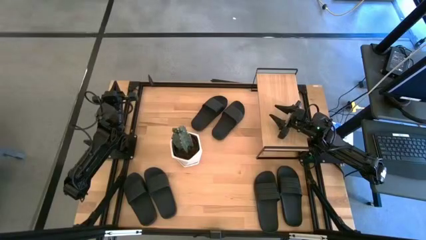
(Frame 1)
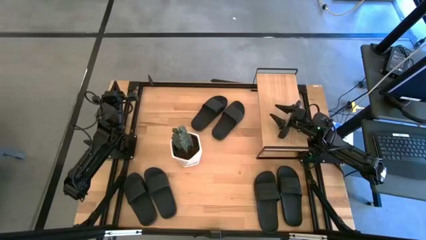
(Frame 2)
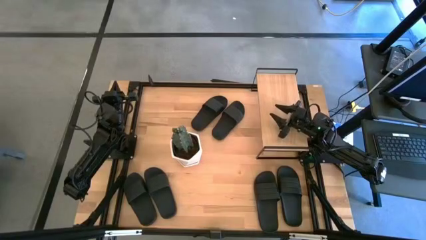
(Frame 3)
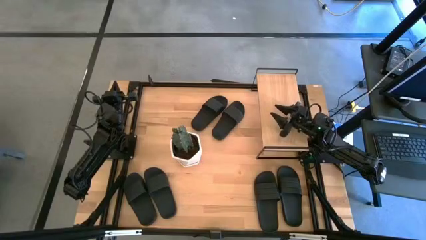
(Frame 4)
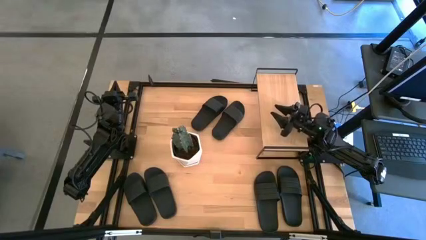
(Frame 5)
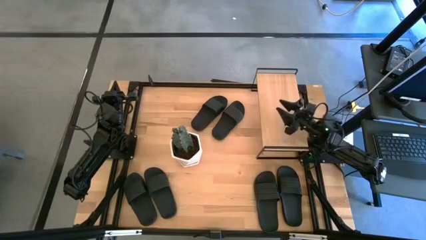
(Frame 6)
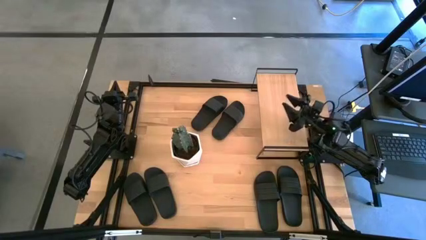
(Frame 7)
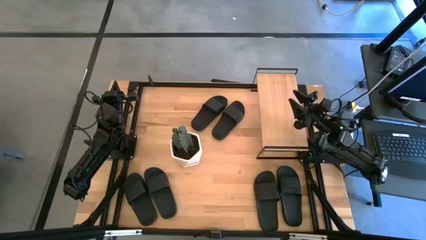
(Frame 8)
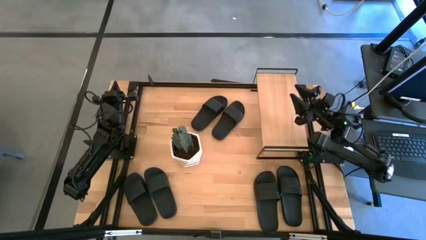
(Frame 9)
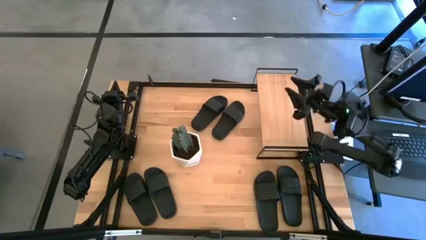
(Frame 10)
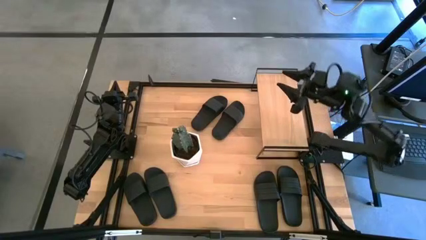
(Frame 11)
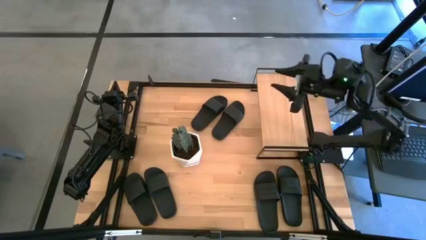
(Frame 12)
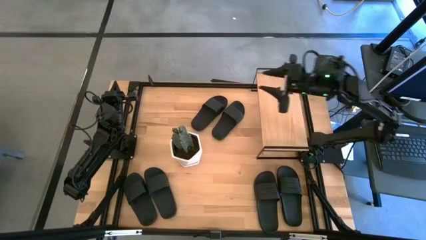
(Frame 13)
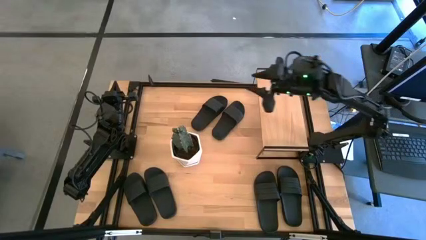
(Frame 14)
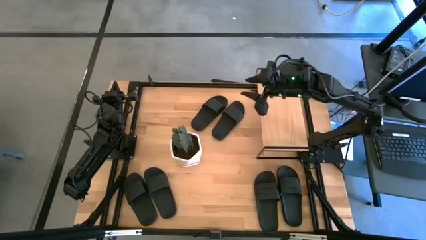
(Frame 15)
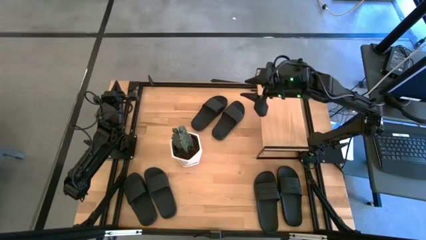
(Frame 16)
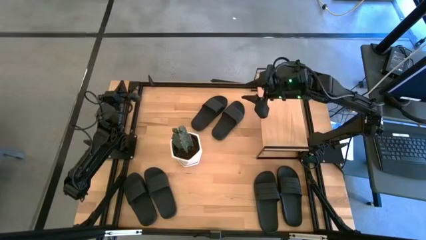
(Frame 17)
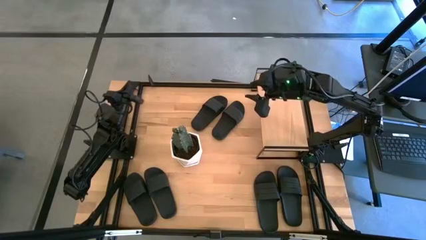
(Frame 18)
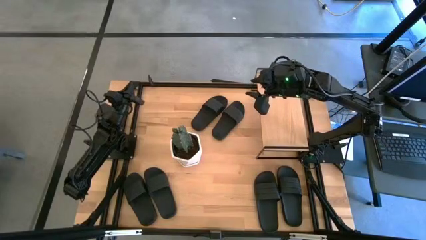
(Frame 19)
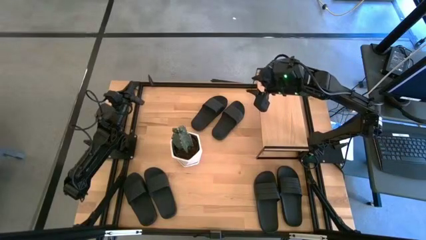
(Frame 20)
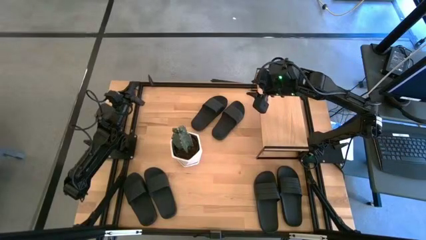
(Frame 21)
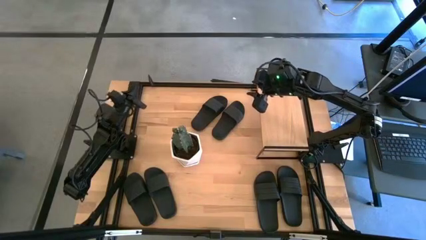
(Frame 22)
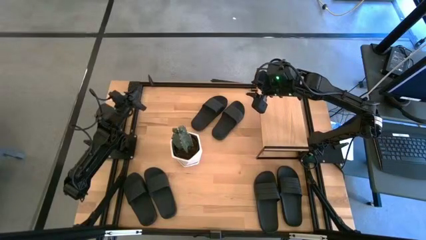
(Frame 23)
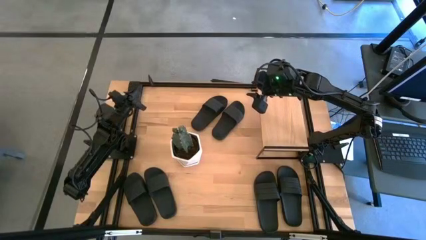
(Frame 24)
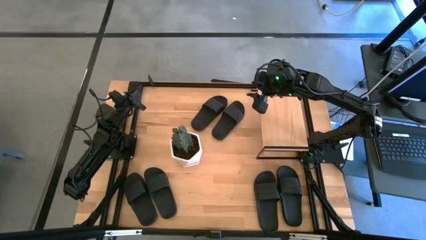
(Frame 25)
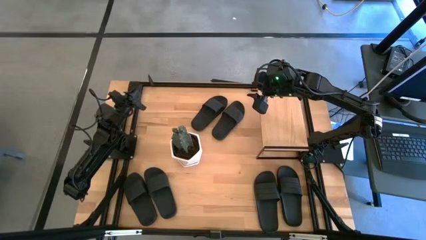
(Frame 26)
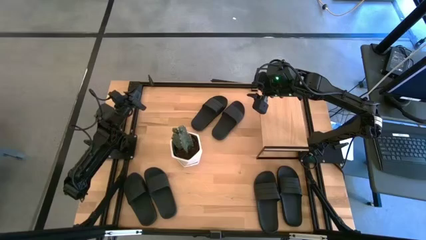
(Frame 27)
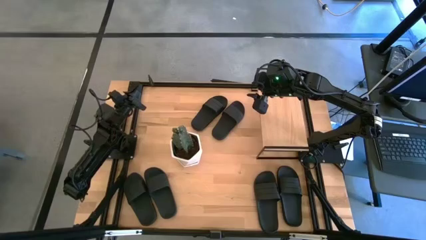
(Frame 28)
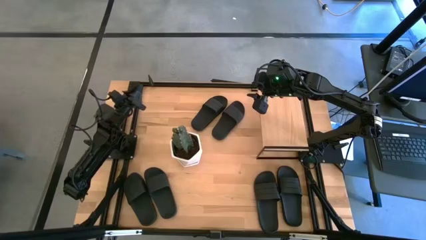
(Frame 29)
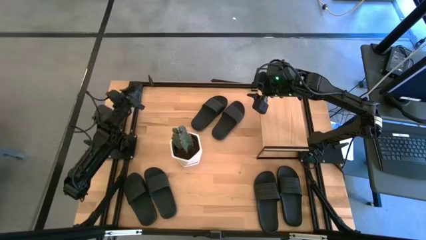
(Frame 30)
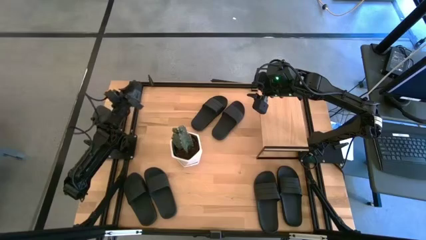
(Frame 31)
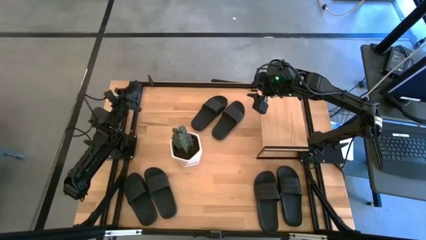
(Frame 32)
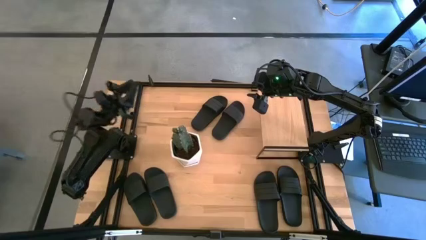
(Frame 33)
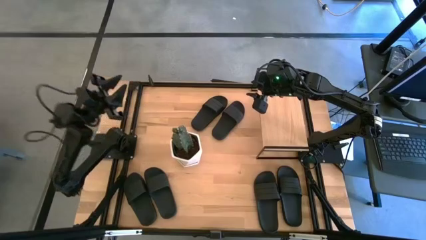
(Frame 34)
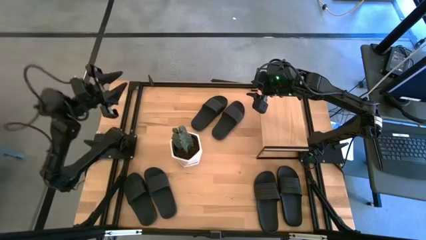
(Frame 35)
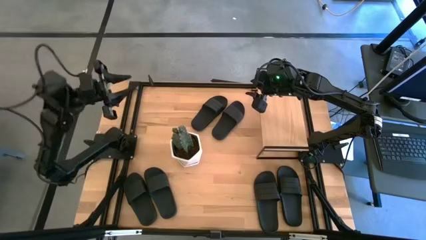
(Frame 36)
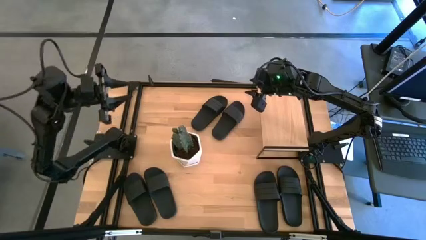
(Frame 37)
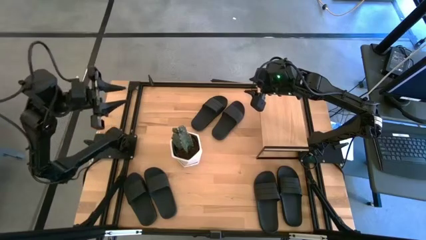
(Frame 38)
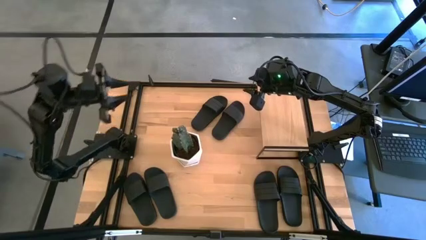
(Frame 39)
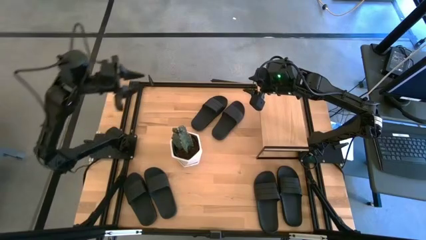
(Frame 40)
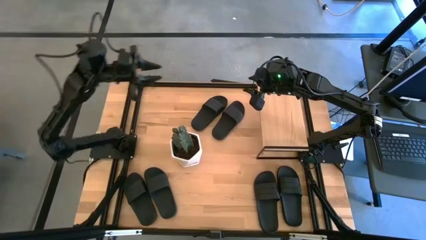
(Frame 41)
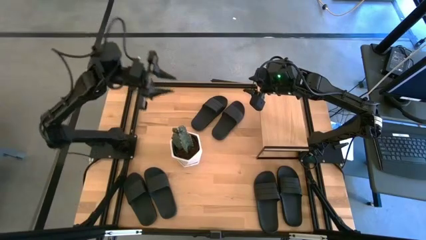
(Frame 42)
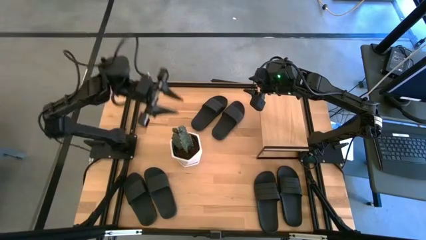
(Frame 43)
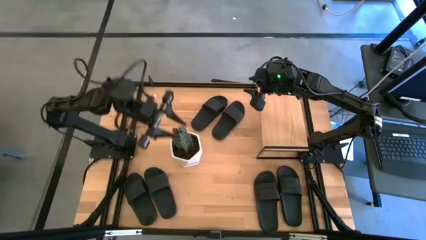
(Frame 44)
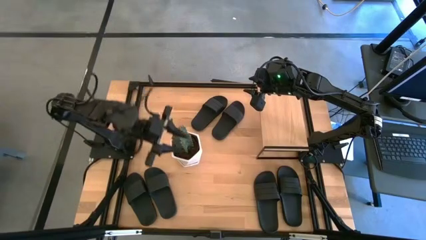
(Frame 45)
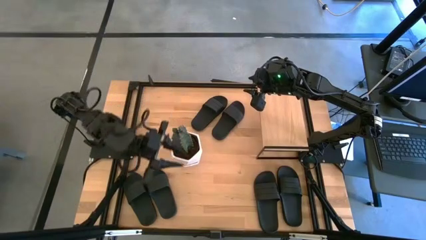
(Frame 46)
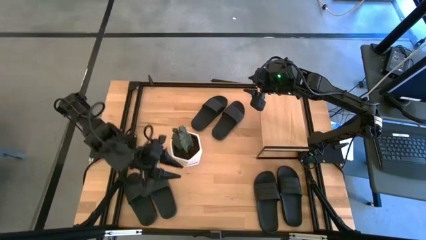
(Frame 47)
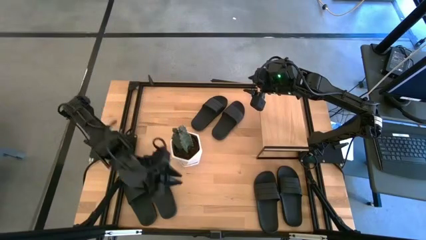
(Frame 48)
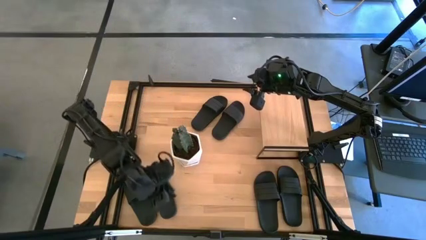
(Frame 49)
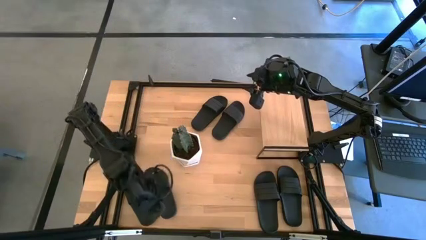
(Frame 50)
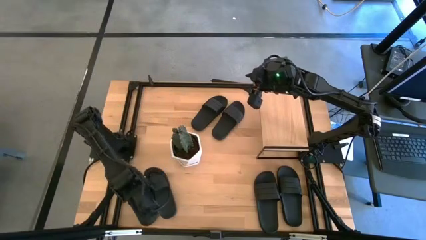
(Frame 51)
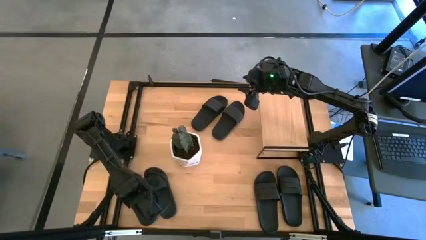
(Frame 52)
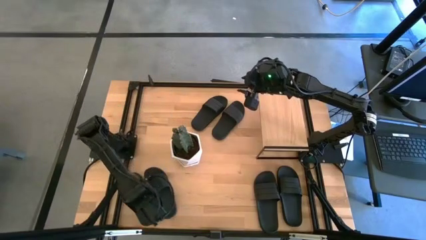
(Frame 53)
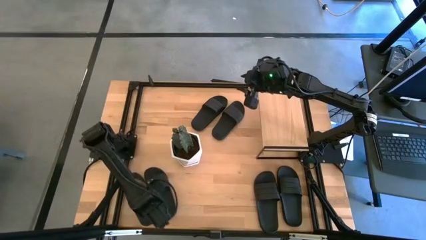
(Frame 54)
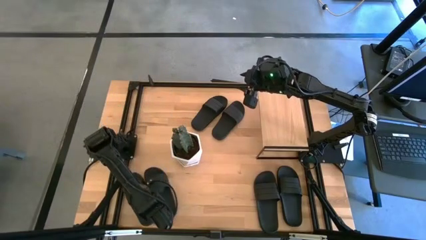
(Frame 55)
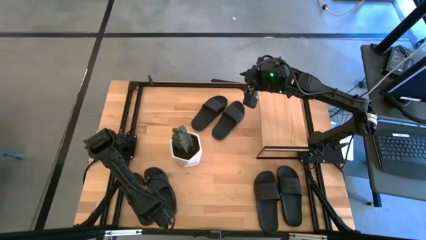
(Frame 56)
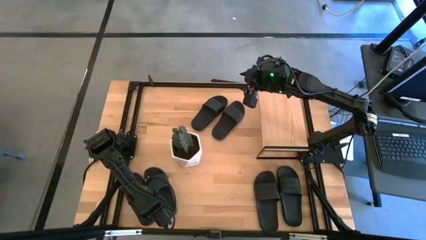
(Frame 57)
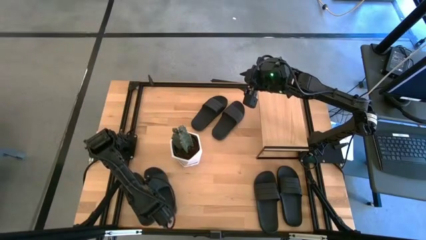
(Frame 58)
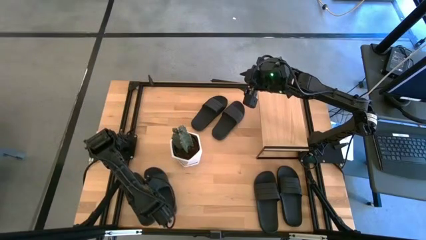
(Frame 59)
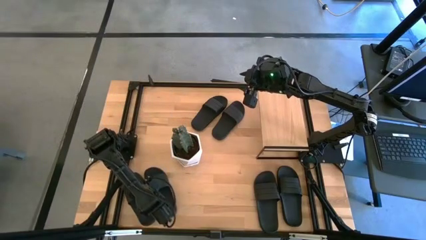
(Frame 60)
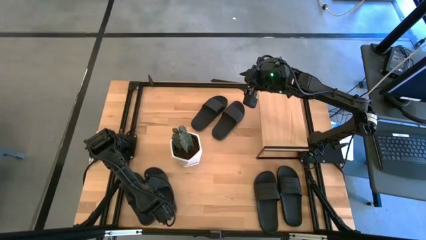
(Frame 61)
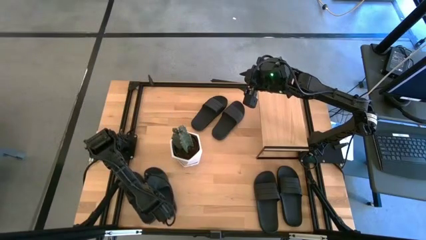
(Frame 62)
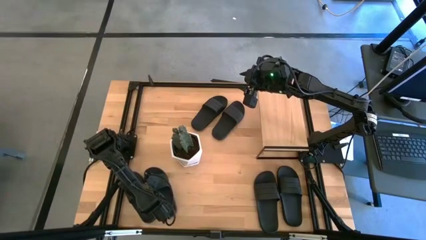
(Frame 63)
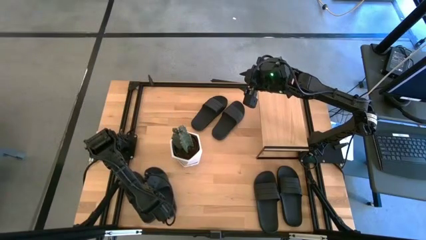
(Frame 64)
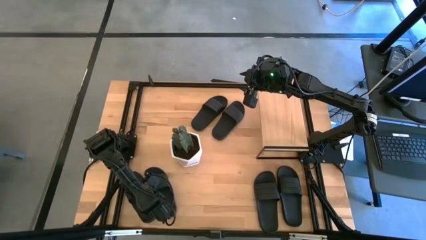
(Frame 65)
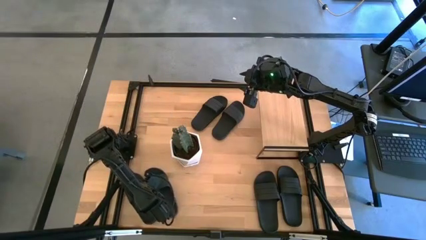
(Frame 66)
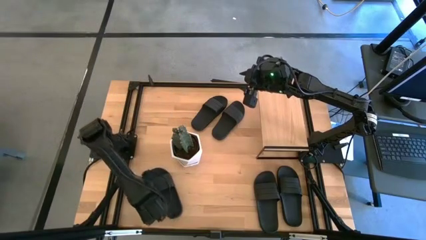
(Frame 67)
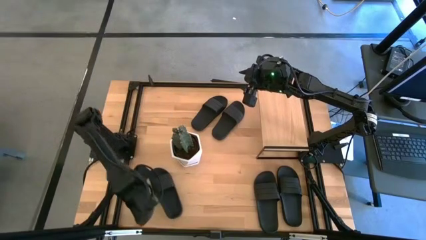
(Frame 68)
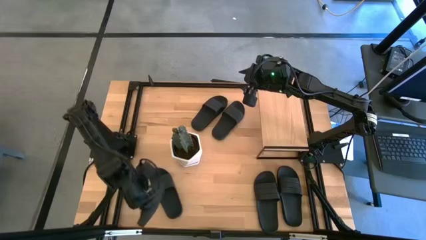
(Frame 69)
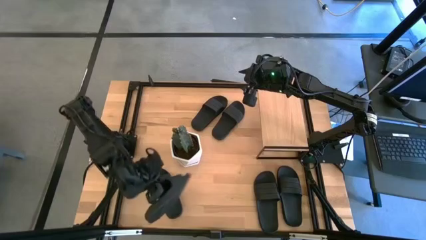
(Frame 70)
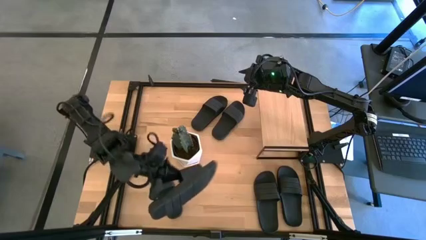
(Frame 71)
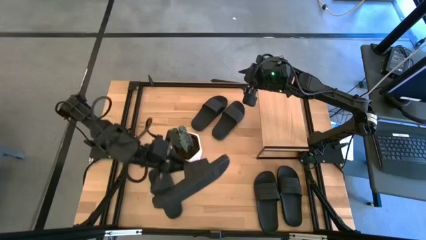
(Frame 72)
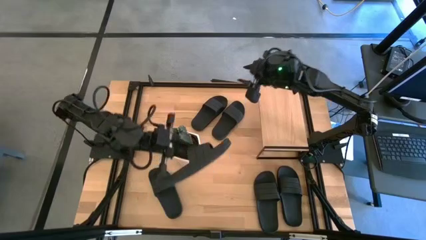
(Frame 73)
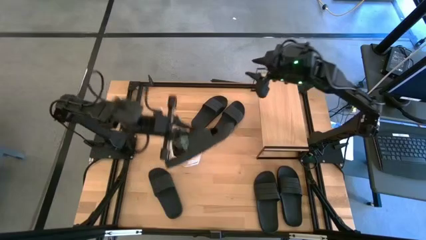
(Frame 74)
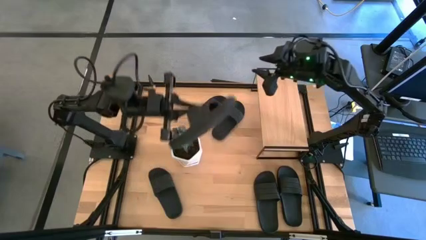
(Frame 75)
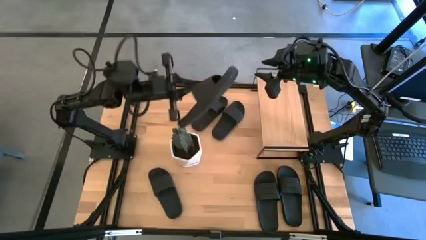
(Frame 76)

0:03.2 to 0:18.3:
Task: Pick and place slides into the shelf
Put the black slide on the shelf
